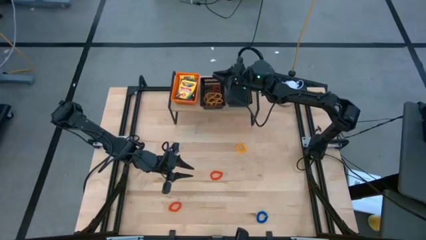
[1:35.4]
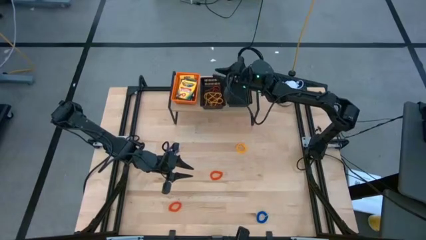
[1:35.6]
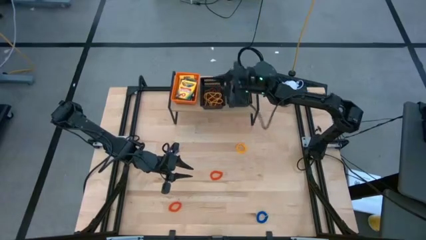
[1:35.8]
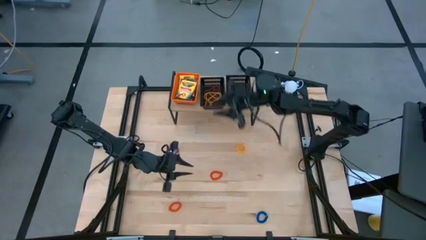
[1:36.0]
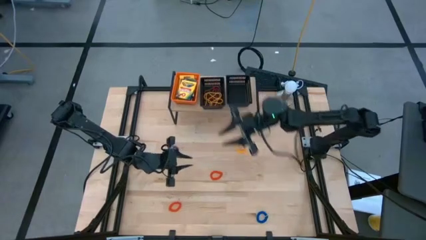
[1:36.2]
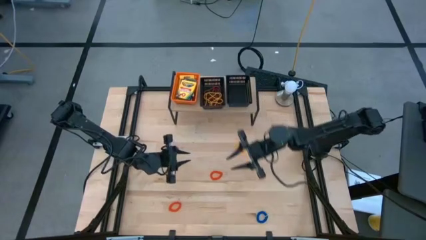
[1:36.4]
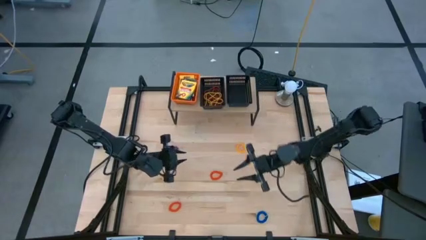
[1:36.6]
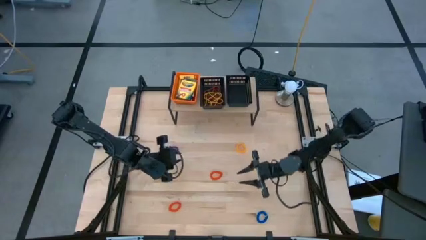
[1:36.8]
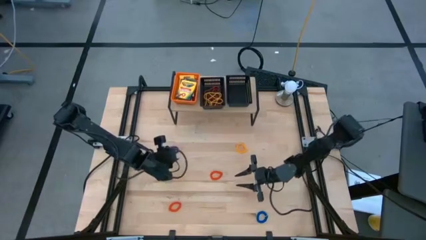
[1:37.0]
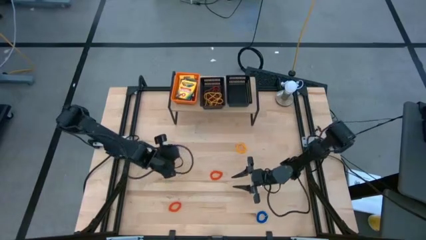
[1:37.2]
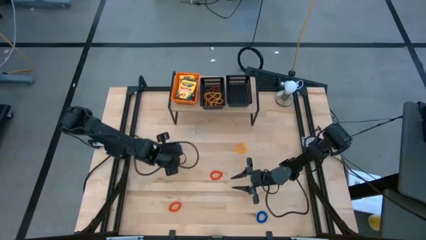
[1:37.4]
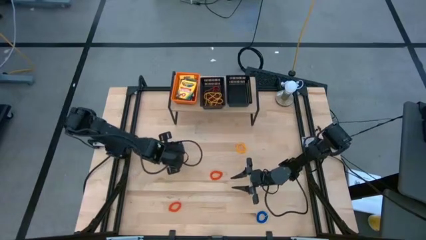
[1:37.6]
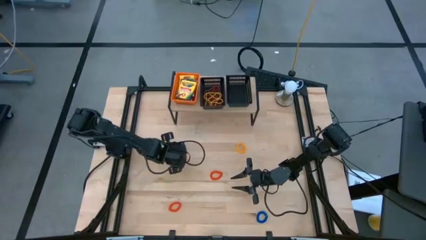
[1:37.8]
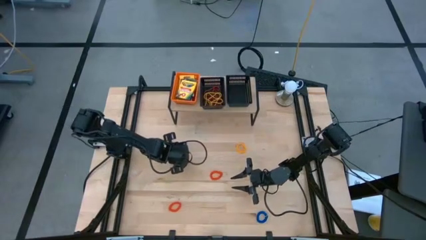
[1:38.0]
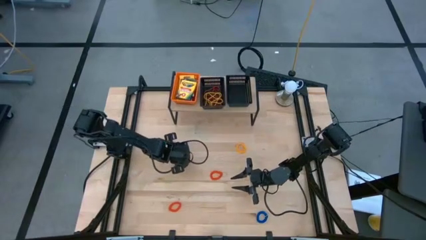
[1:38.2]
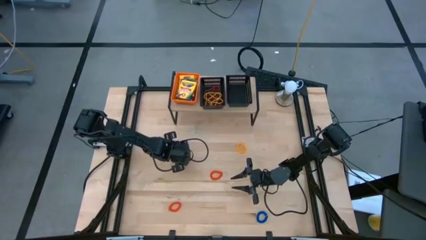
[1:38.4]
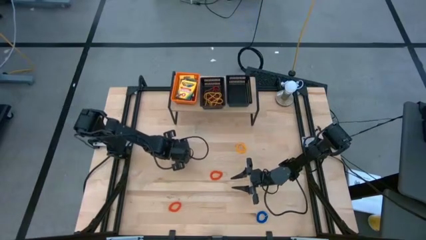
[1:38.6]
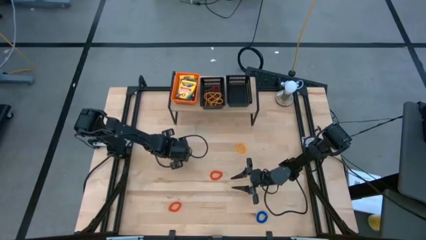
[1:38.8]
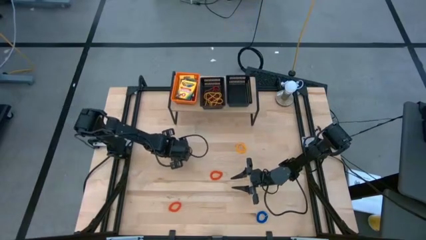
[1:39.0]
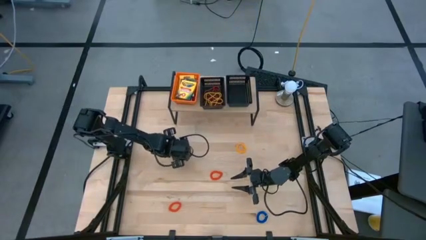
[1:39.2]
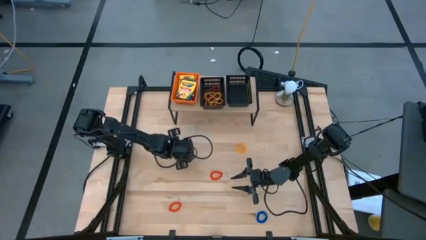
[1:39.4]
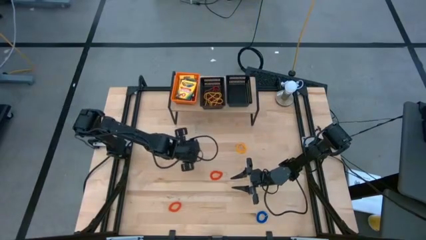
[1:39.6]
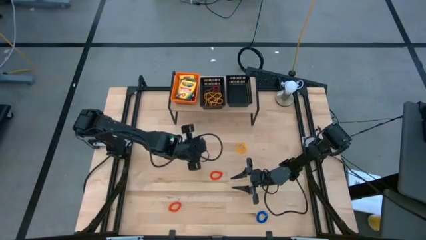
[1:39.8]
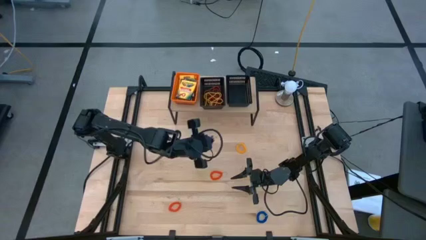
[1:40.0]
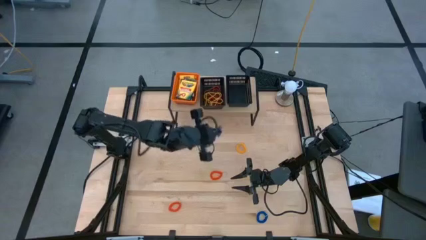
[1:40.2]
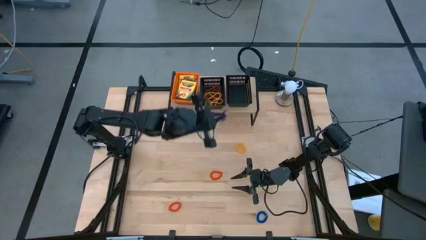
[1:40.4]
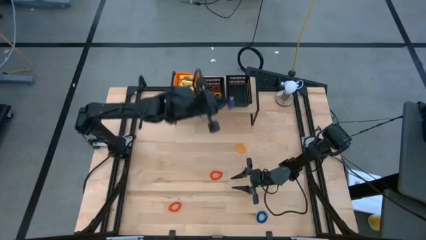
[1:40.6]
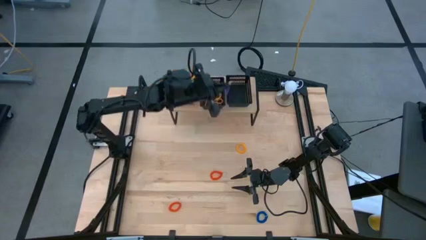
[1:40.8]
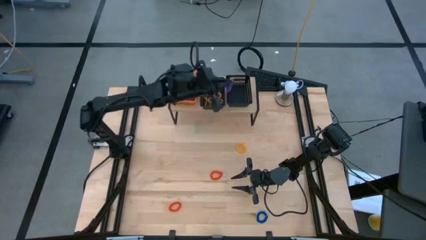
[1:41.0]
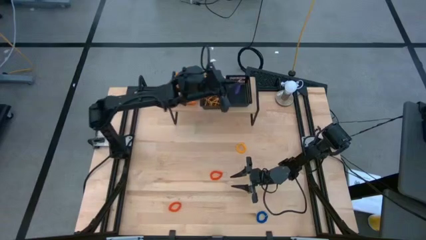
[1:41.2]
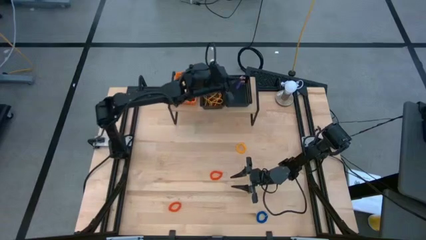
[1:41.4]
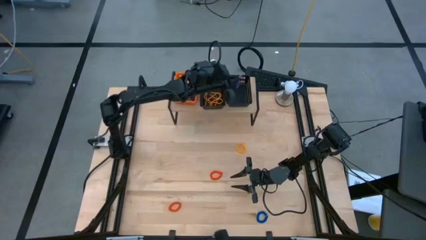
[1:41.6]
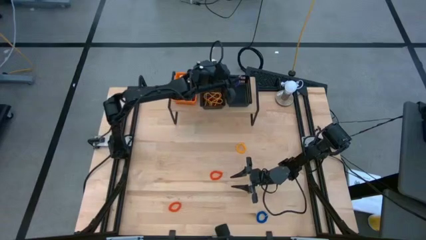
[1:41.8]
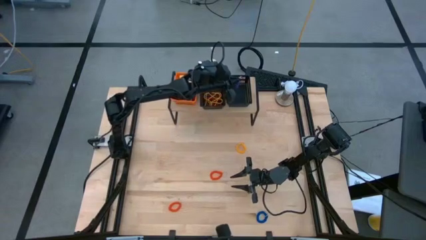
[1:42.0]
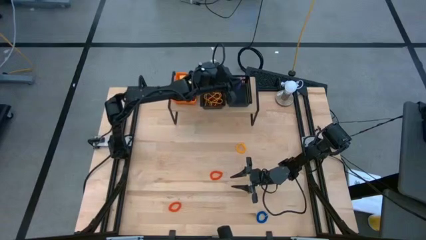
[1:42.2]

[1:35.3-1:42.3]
Task: Pick & Place Office Desk Supplies
Put the purple spring keychain into the right black basket on the shelf

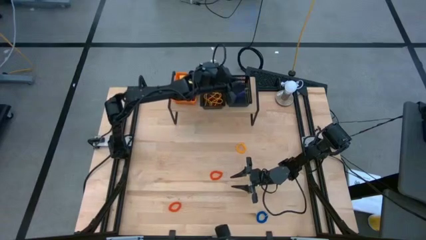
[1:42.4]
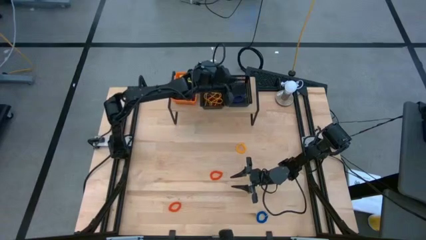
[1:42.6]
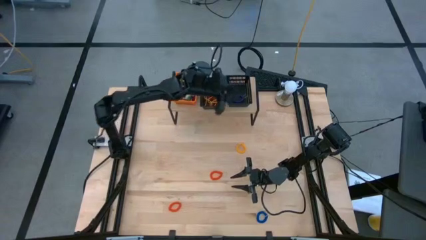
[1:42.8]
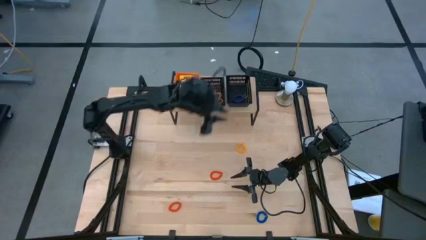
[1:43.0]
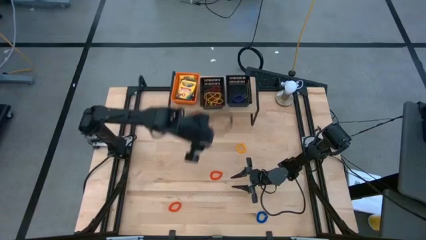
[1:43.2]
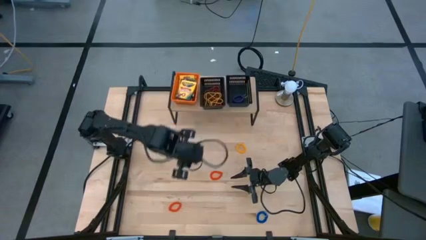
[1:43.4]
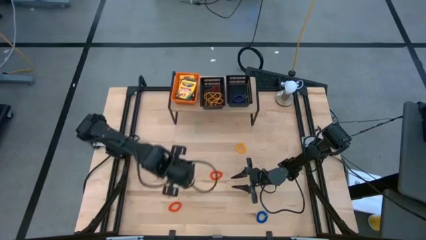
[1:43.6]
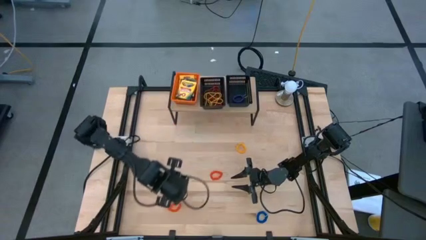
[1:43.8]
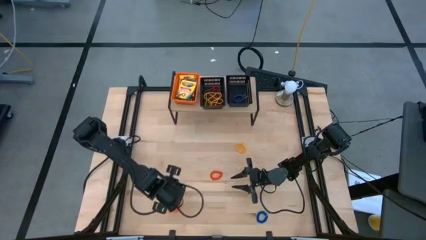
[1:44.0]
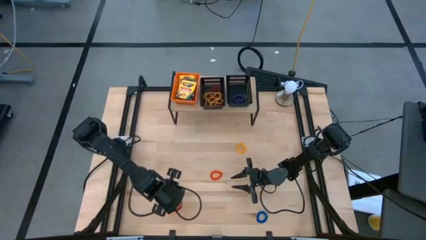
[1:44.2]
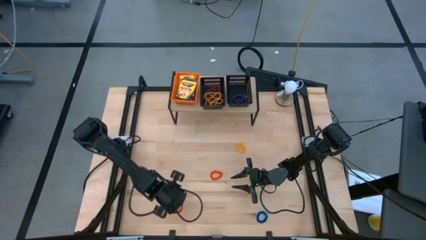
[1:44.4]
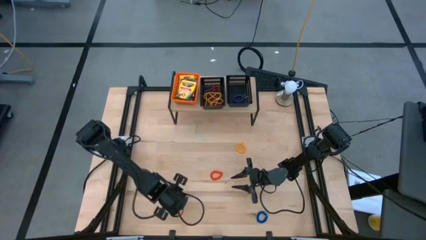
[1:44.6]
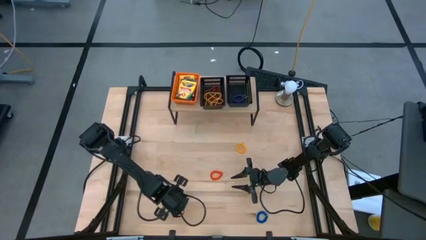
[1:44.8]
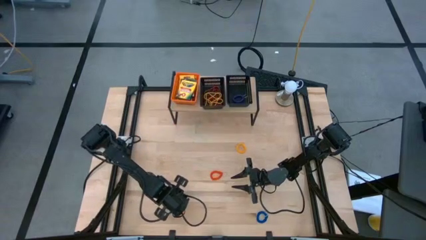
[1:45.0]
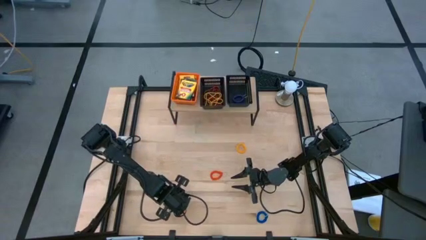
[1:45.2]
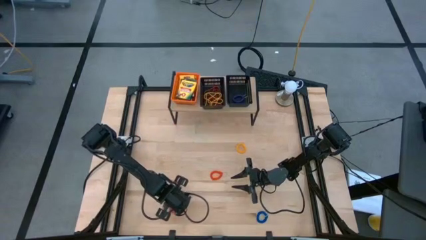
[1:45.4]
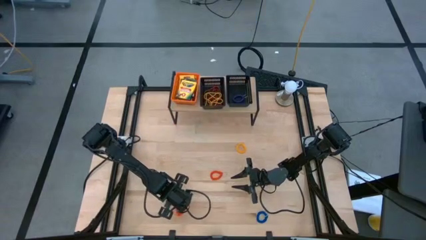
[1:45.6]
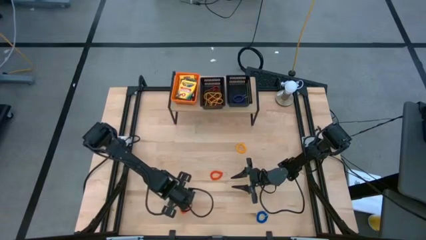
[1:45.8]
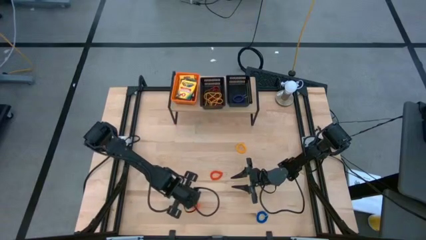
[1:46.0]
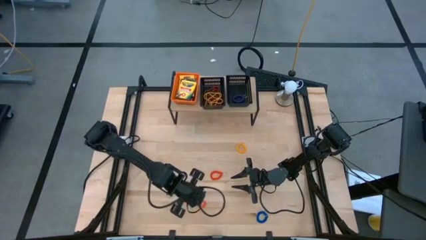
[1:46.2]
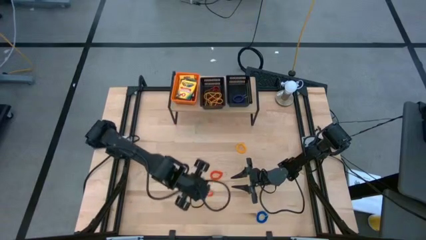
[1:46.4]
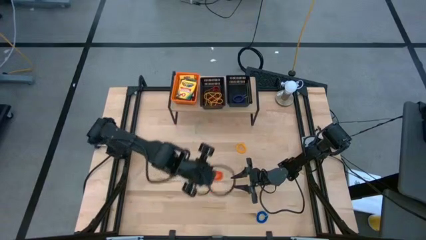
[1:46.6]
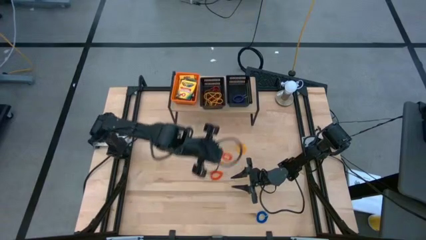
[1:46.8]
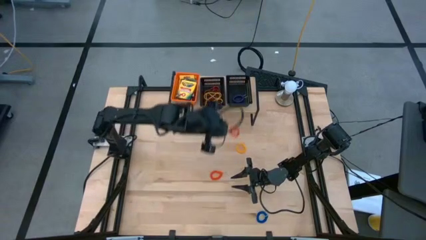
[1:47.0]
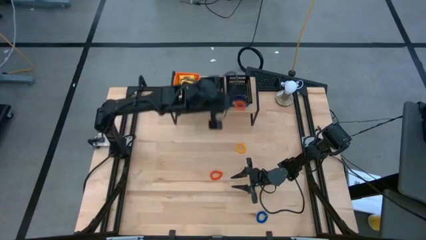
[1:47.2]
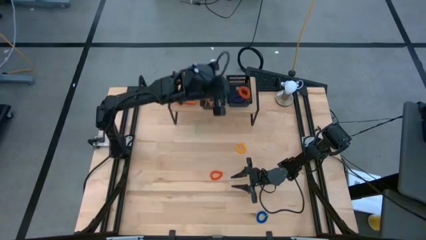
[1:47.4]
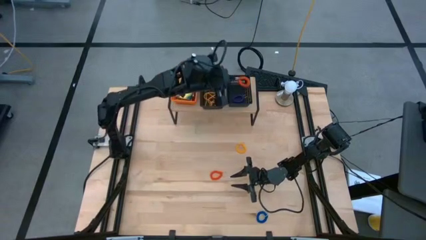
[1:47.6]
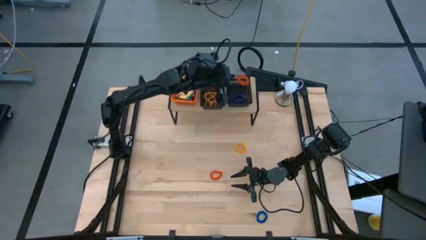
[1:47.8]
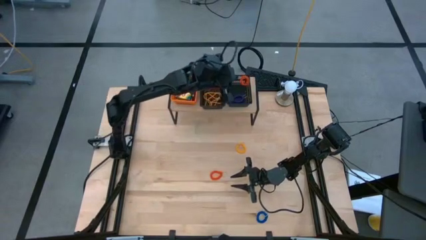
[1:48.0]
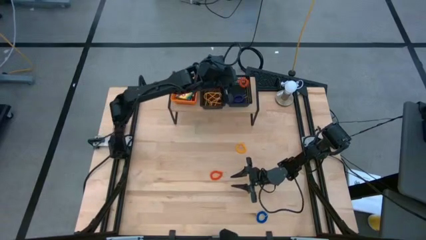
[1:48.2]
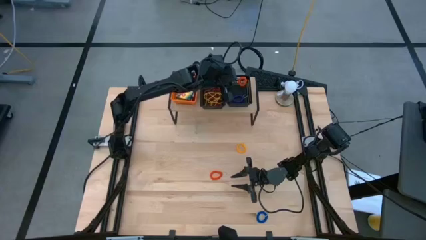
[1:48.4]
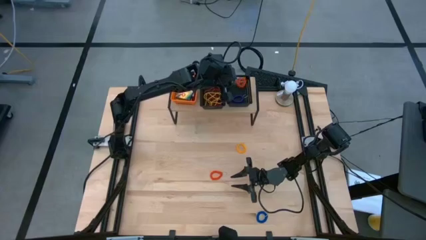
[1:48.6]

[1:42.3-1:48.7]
Put the orange spring keychain into the right black basket on the shelf
